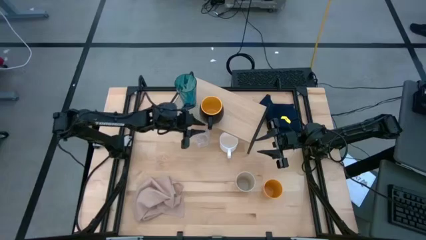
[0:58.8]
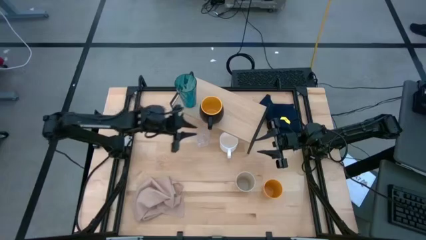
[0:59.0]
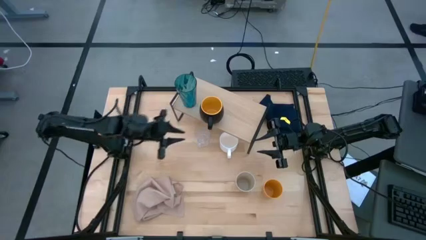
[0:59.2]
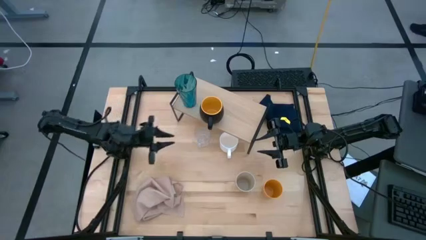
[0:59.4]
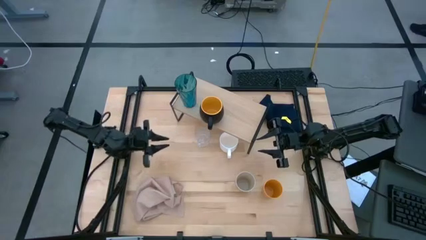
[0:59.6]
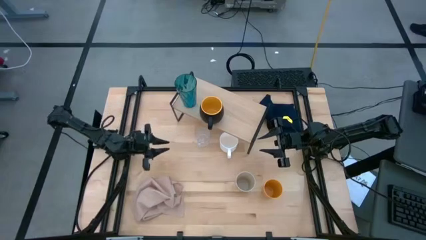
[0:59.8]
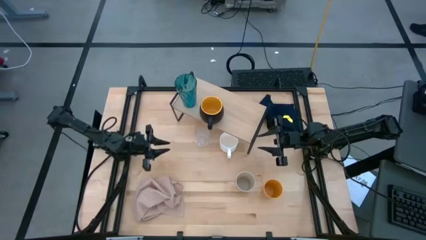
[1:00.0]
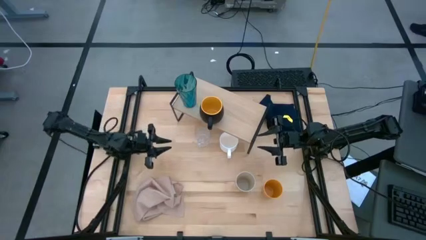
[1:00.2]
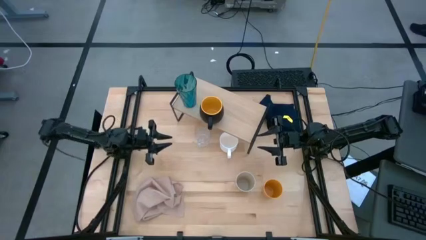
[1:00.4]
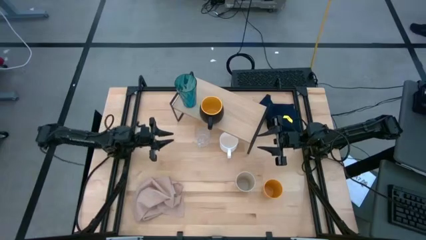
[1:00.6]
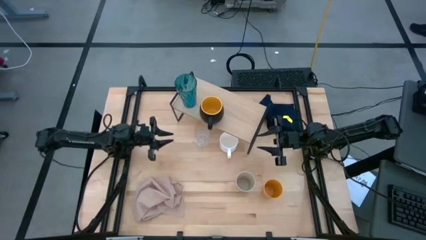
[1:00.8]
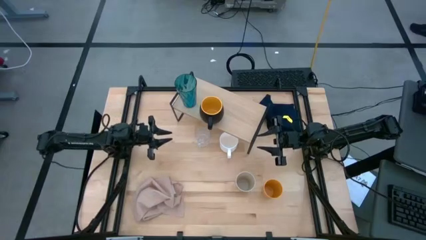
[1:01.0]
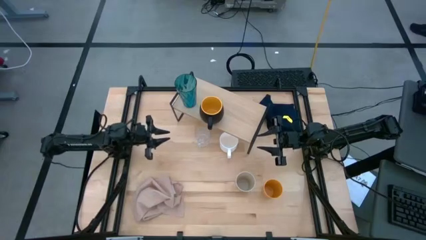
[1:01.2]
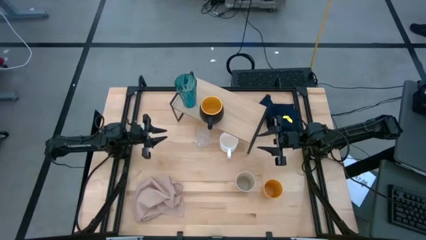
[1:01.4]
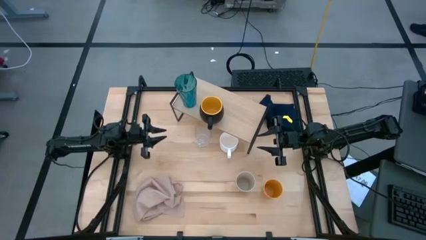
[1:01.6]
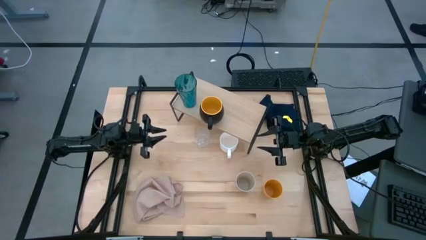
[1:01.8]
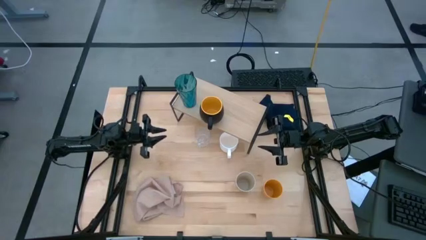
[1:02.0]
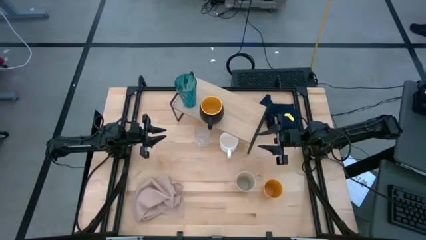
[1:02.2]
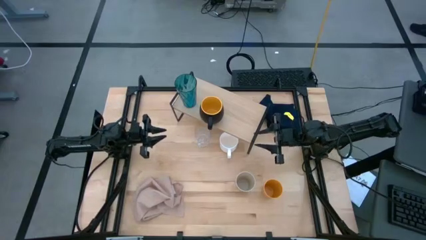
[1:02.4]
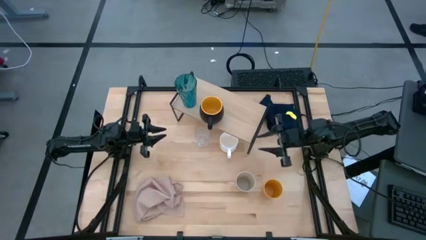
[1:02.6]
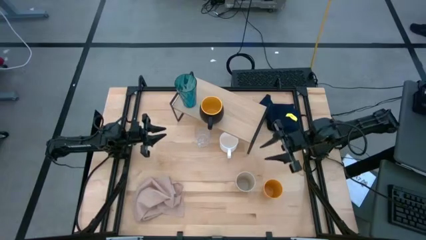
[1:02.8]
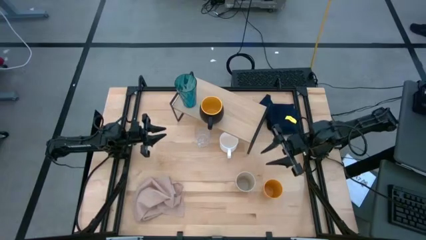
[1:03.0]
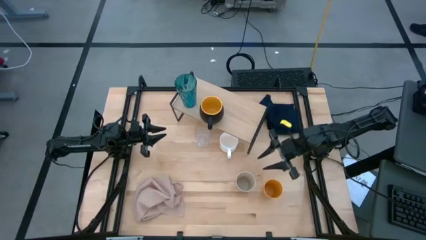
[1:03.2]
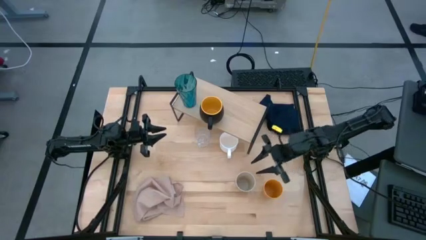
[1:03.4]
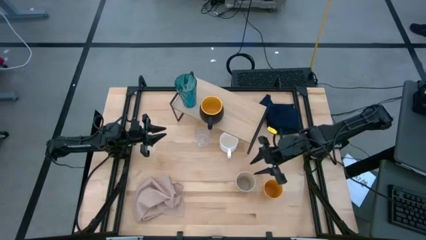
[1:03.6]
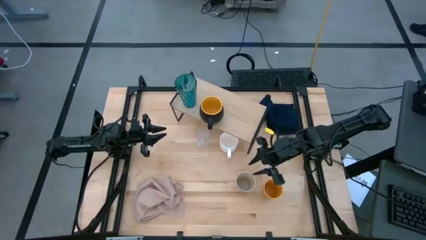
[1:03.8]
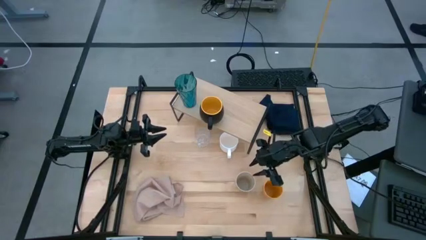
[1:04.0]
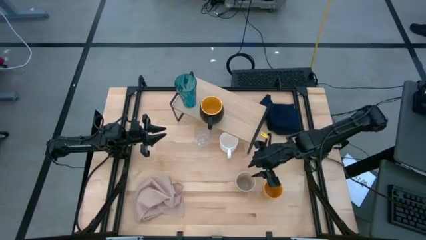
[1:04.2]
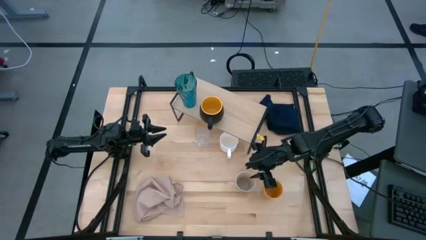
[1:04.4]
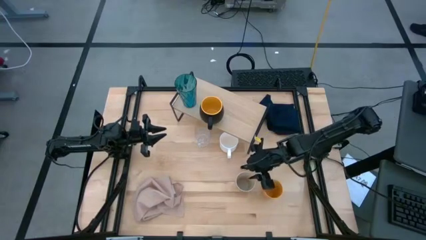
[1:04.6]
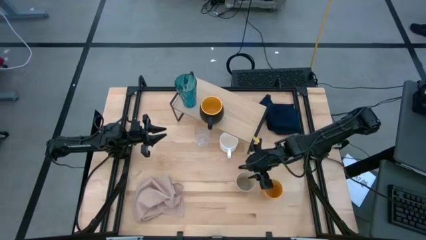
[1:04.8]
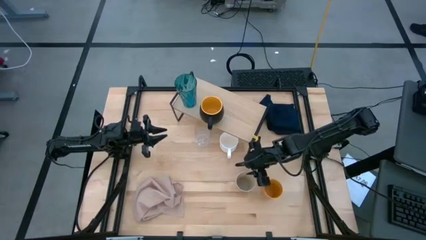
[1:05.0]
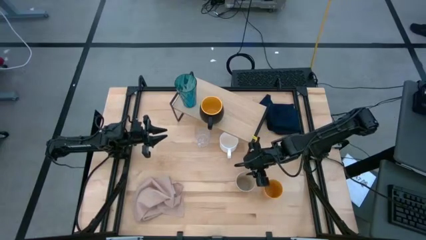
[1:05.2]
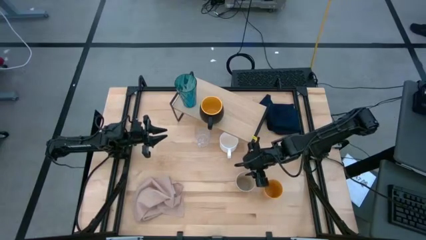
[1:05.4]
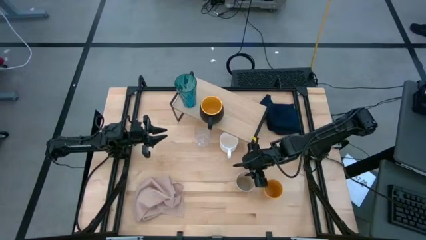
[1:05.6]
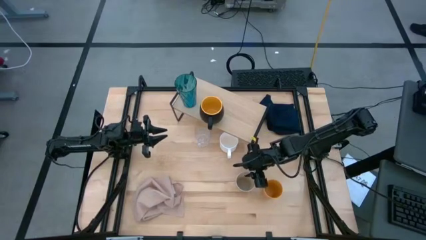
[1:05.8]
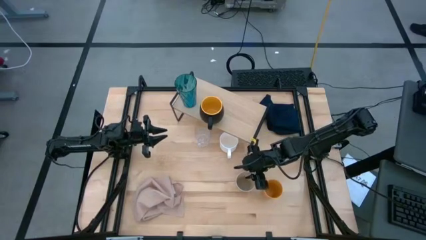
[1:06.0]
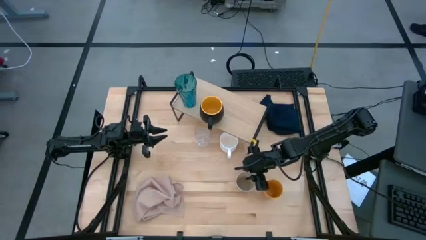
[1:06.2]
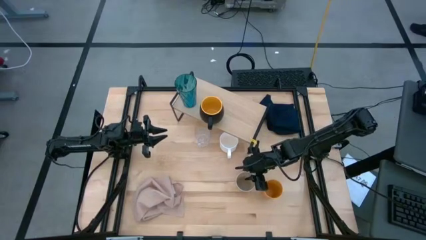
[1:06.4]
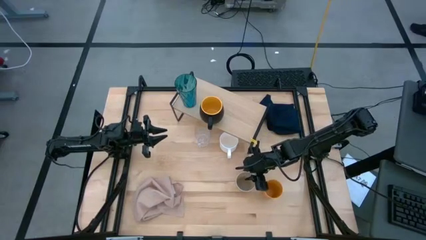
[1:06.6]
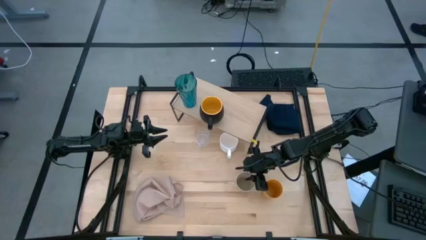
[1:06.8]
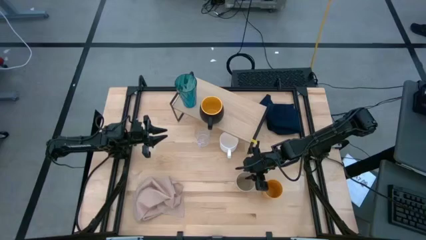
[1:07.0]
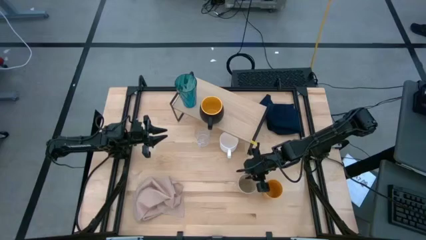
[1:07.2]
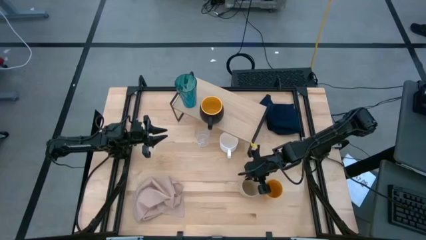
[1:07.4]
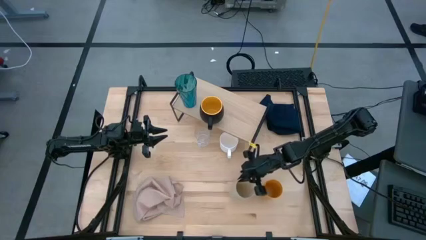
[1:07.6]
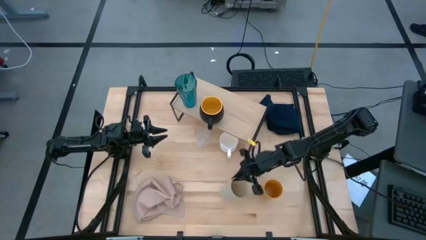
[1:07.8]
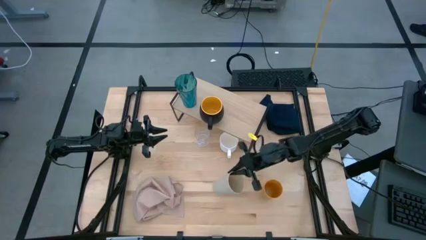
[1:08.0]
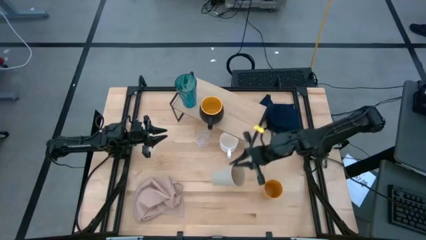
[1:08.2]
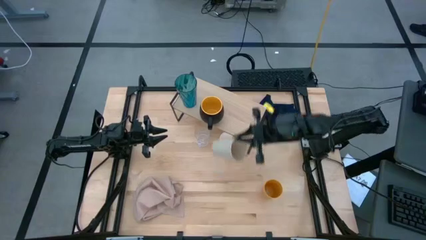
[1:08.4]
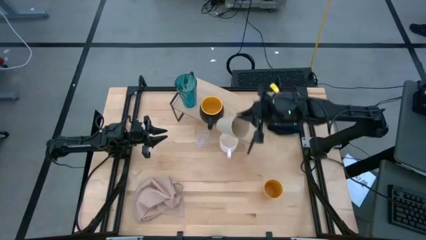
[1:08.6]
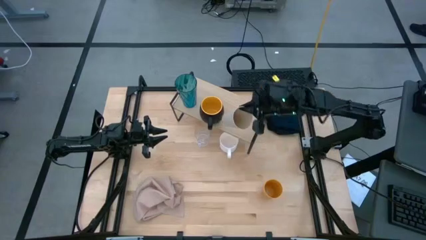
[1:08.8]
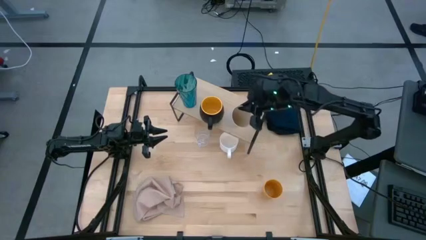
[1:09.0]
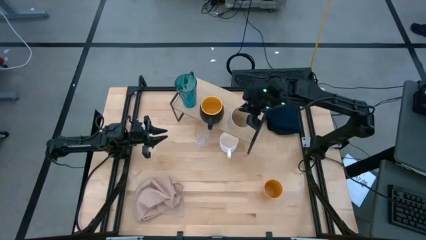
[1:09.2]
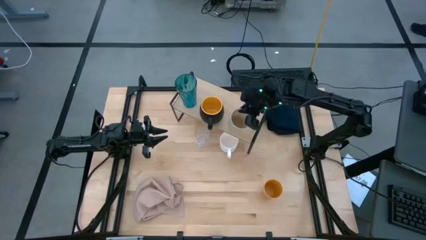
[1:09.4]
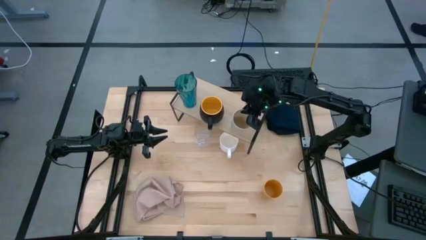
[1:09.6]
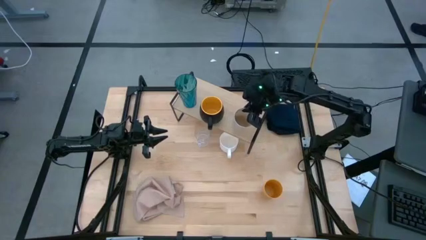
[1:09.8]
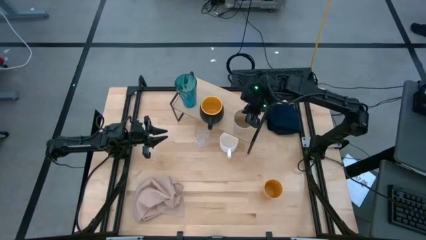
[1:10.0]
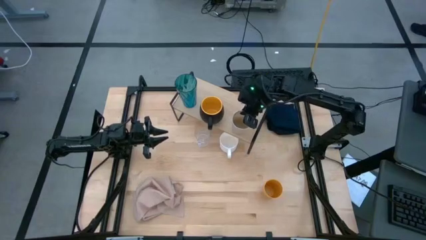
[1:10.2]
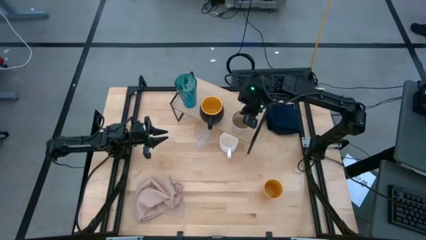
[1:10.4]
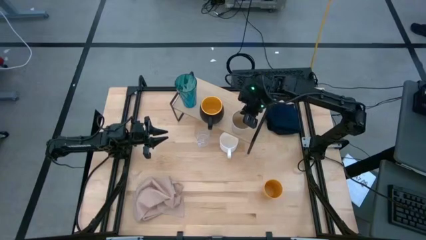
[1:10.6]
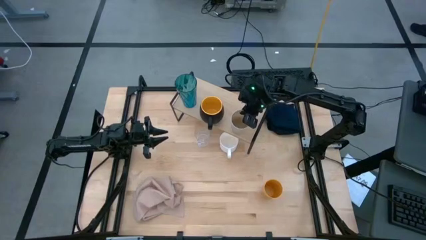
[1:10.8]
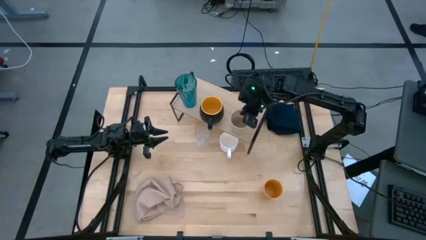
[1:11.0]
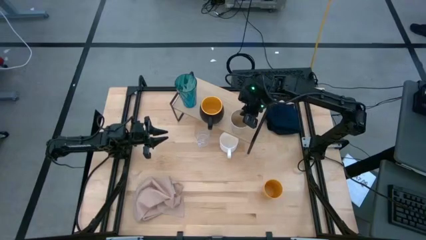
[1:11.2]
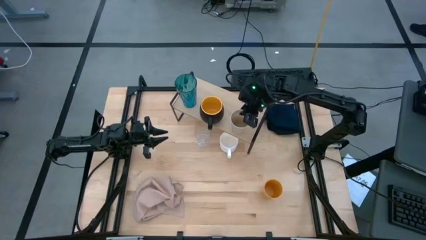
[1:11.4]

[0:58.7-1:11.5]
Task: Stack small to large cups/mugs on shelf
Put the light brown cup on the shelf

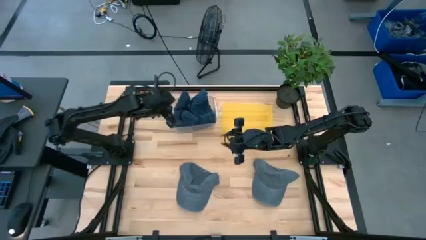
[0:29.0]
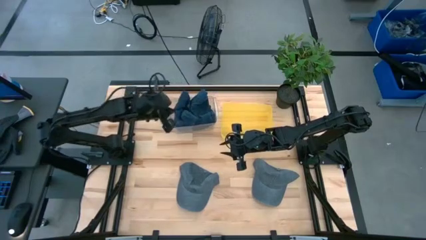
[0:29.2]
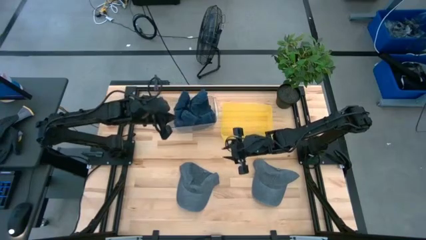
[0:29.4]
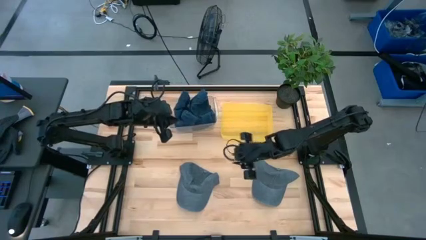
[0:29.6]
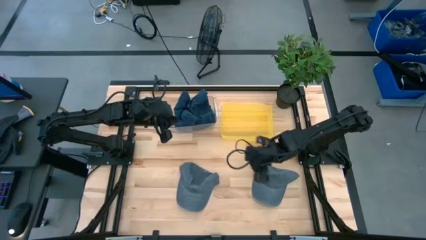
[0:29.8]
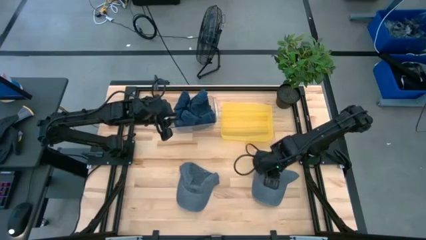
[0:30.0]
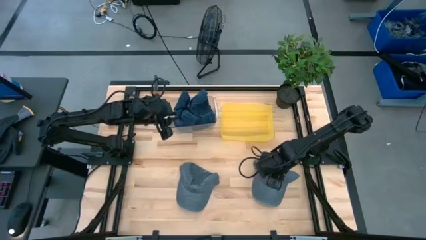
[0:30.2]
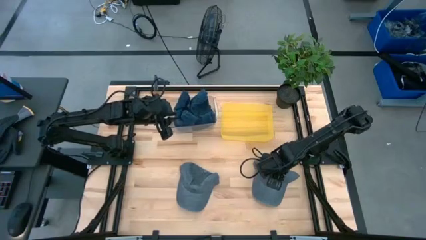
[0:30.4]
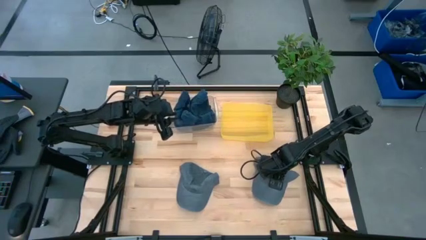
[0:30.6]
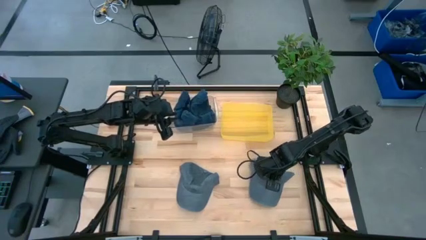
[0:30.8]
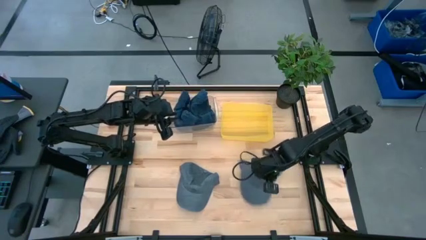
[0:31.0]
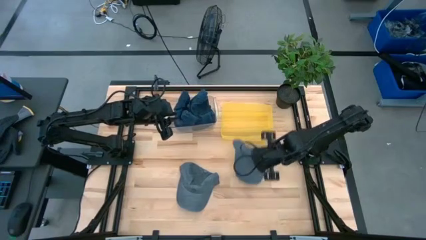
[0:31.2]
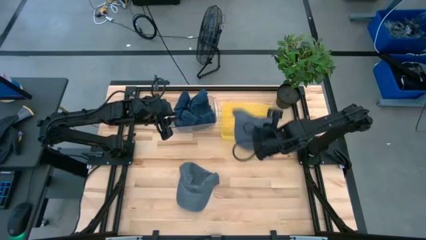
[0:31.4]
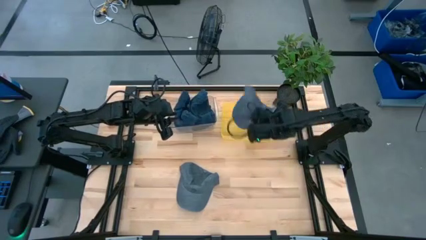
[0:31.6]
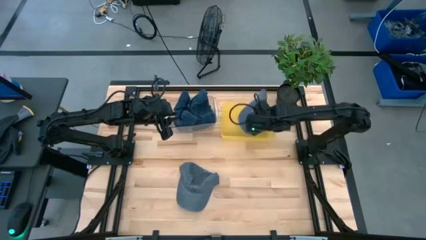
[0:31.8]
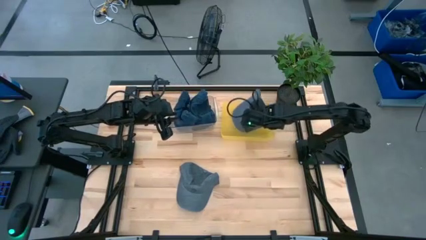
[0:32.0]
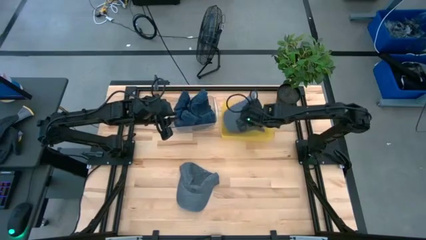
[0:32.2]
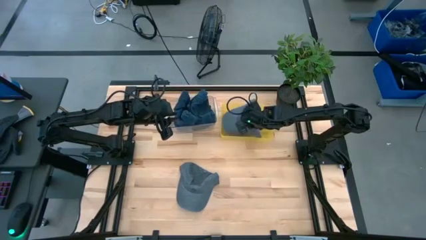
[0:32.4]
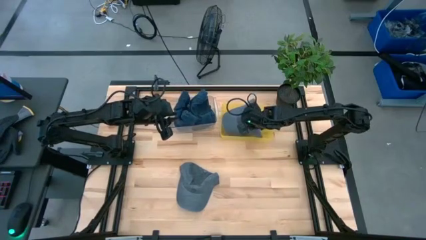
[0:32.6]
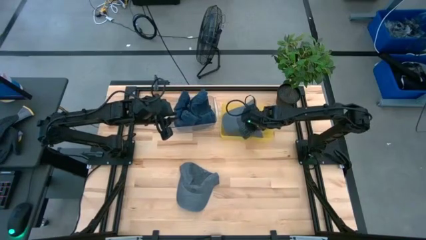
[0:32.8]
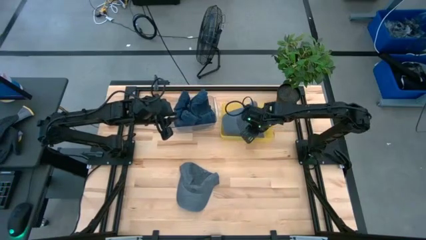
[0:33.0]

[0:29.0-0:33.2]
Task: Pick & Place hat
Put the right gray cap into the yellow bin
